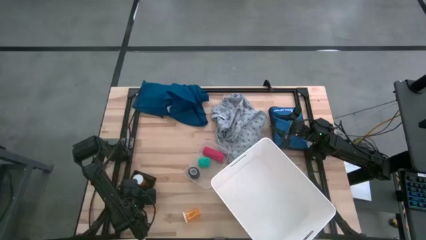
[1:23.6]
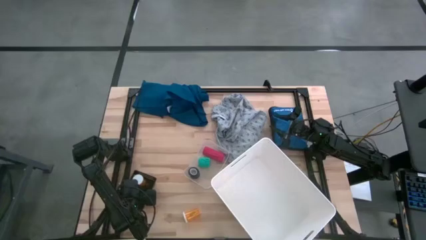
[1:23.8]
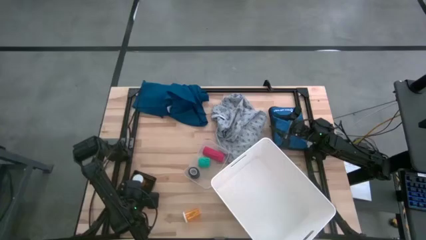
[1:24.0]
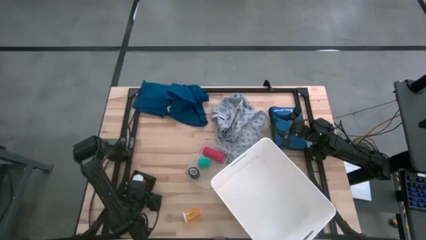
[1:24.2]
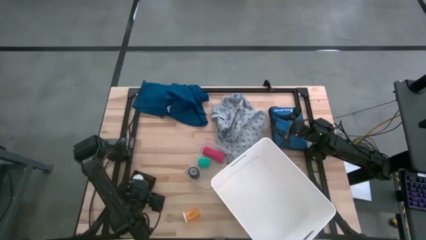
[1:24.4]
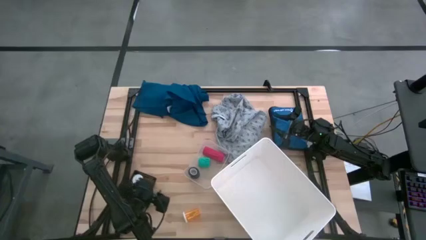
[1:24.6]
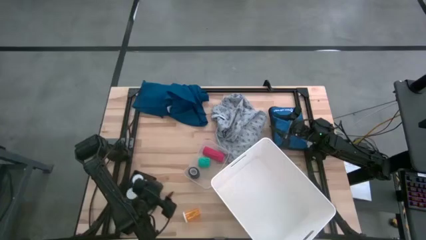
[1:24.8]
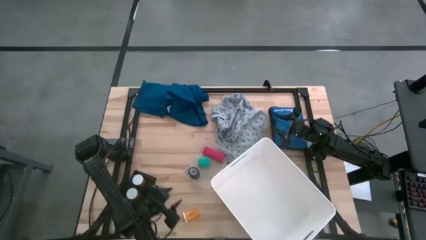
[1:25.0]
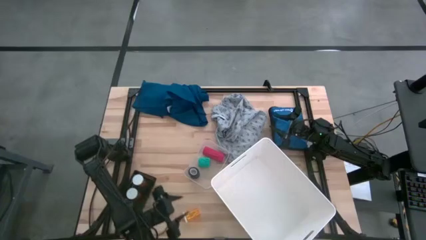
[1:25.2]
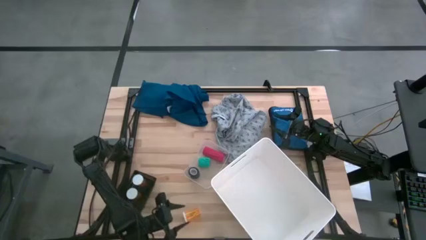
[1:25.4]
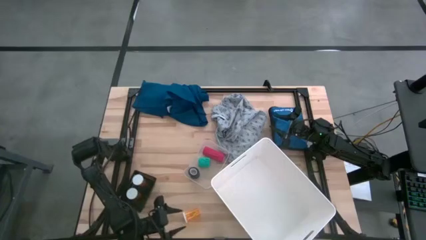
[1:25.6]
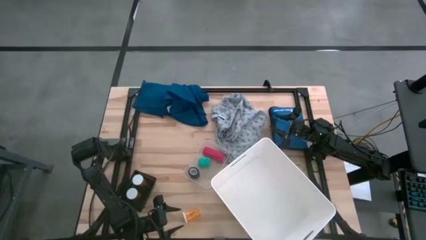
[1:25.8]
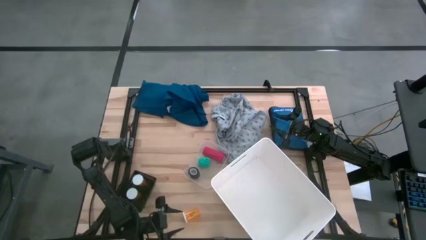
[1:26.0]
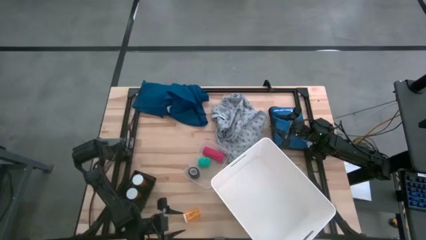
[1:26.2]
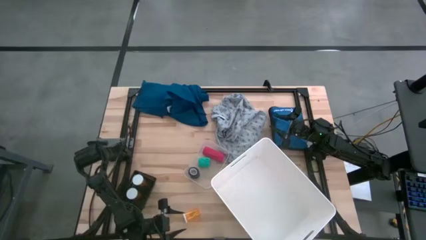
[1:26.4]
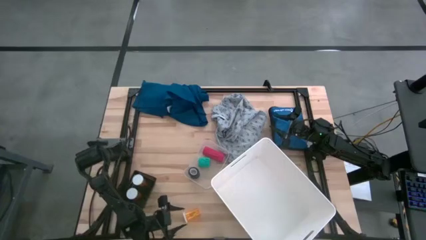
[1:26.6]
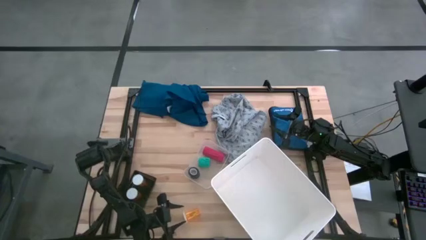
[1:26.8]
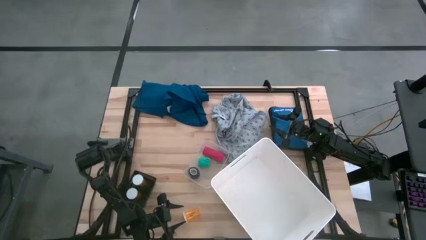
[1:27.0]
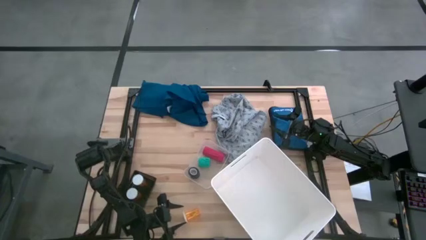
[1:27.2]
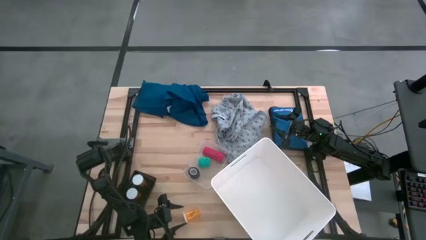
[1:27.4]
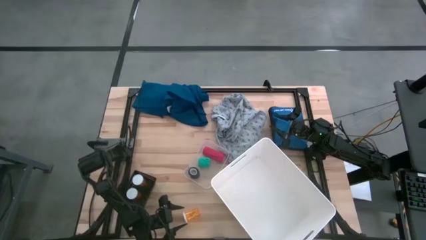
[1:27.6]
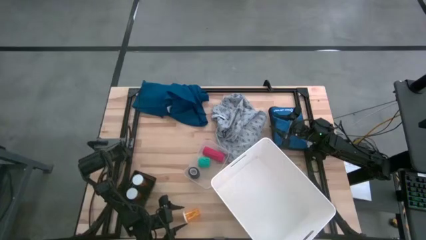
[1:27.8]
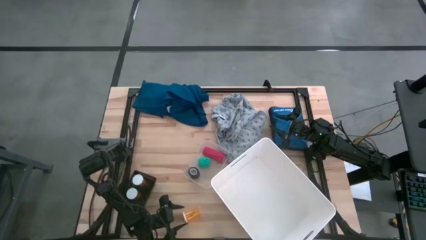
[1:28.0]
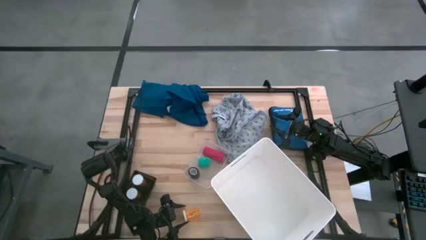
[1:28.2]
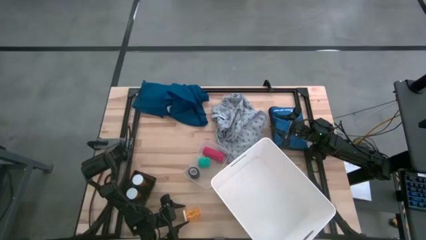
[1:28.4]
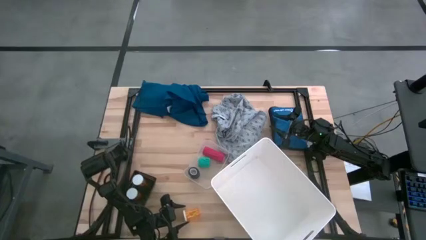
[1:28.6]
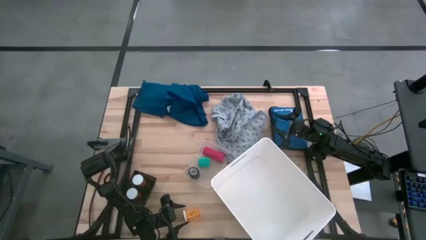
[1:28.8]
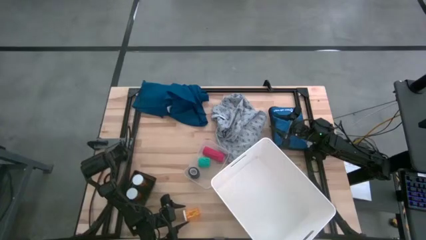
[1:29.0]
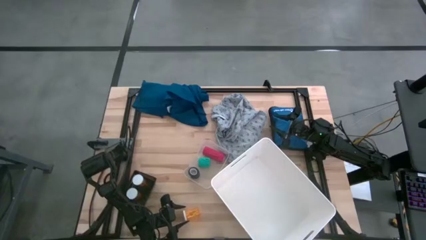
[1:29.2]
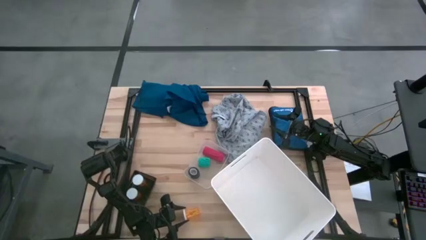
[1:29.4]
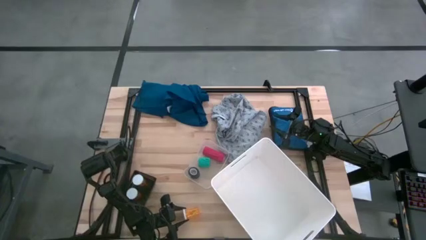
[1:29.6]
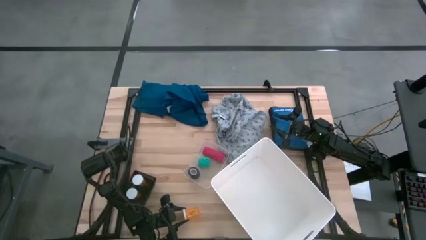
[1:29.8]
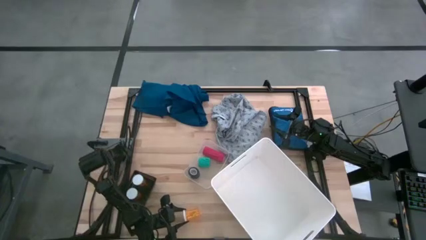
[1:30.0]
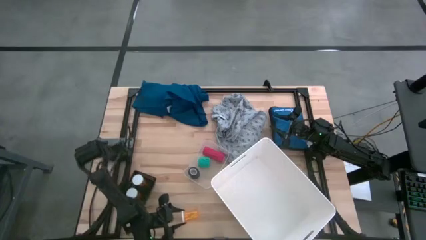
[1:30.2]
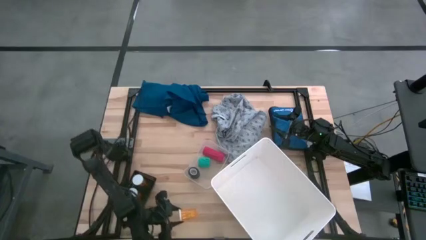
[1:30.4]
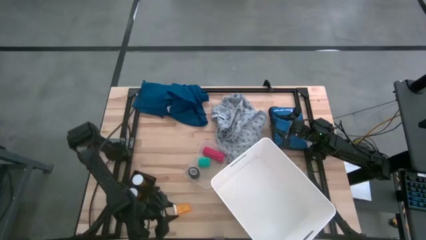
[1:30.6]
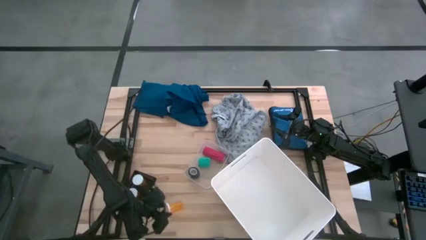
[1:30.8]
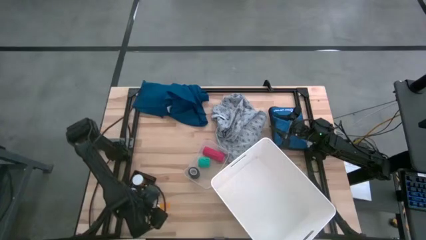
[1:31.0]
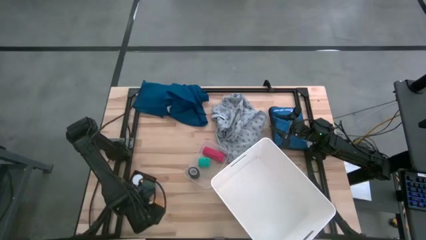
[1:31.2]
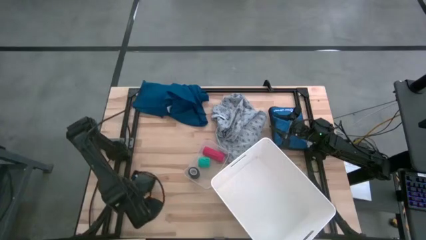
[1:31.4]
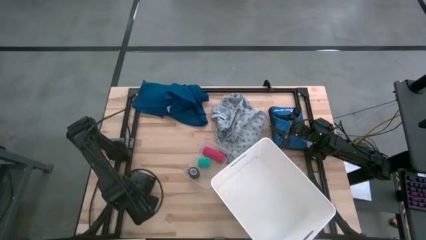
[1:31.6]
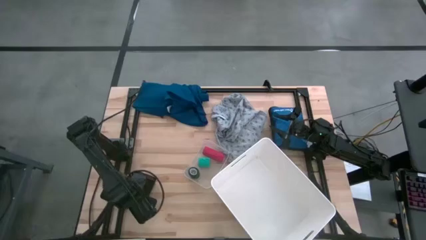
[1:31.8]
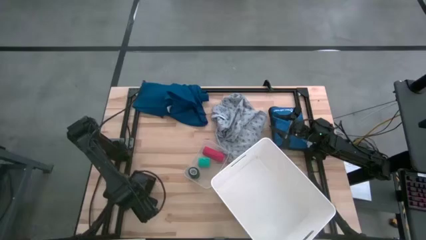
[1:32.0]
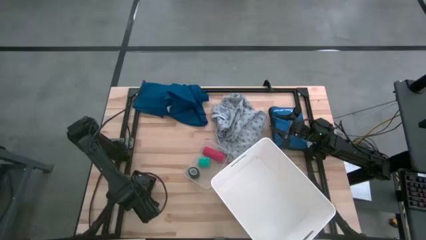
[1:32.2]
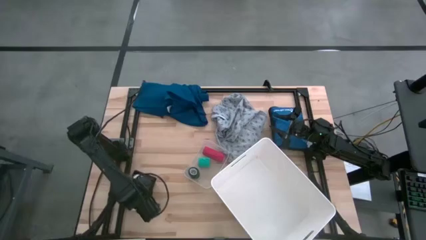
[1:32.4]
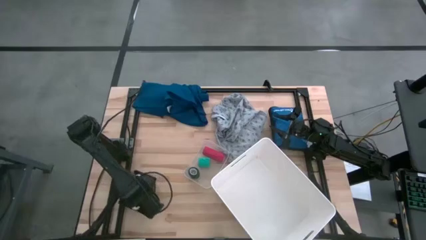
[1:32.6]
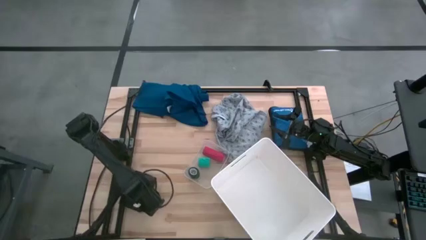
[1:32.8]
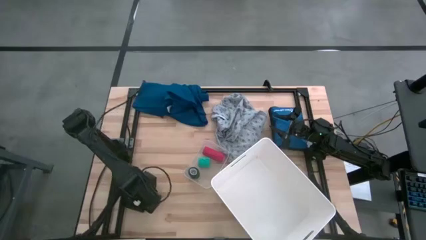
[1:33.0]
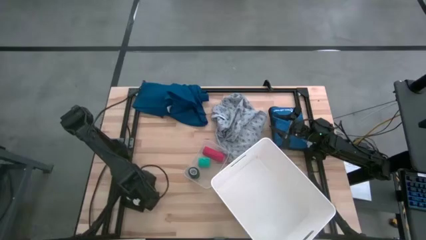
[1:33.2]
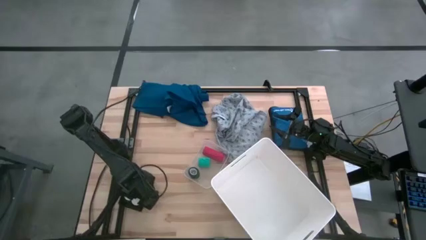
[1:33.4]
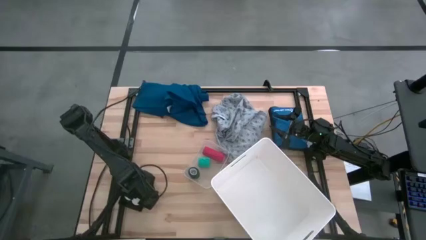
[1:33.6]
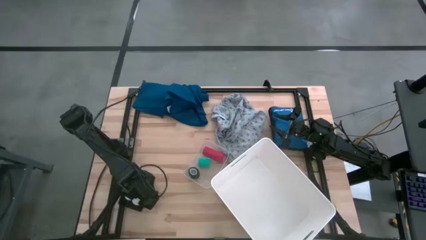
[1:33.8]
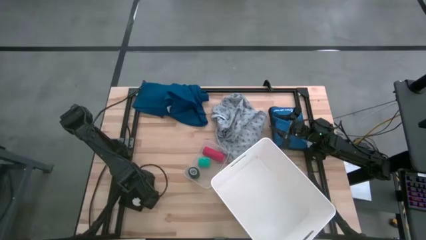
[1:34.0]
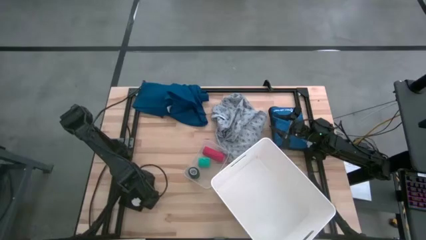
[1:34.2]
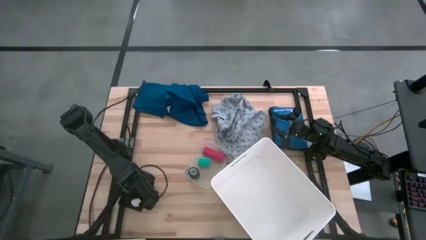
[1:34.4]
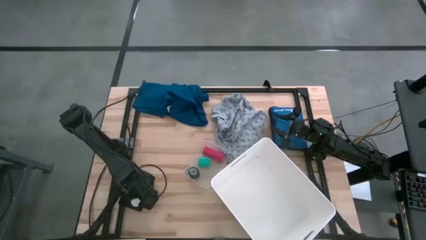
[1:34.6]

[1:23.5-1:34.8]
Task: Pick & Place Medicine items
Put the orange medicine bottle into the black bin

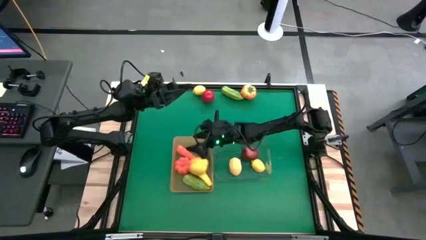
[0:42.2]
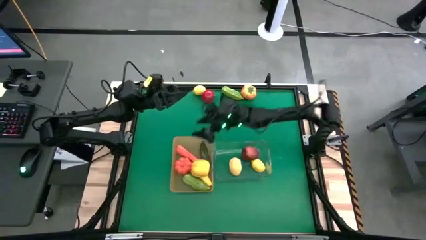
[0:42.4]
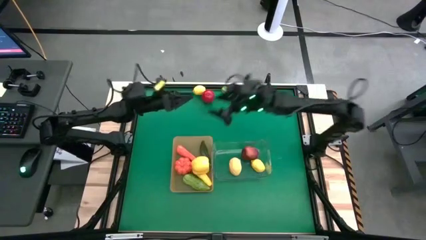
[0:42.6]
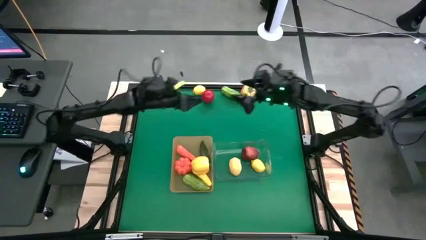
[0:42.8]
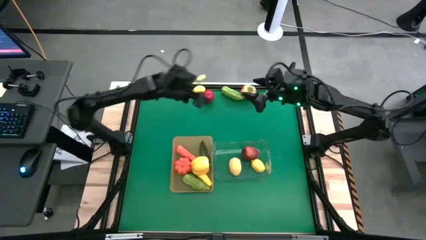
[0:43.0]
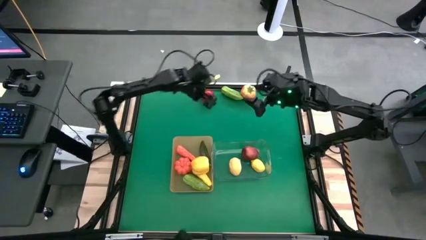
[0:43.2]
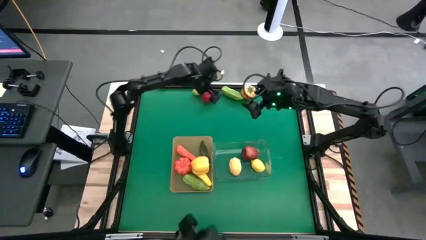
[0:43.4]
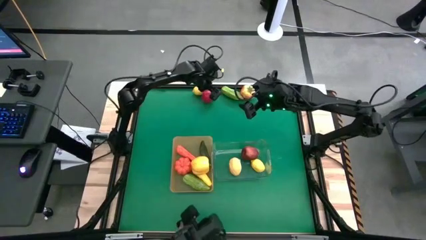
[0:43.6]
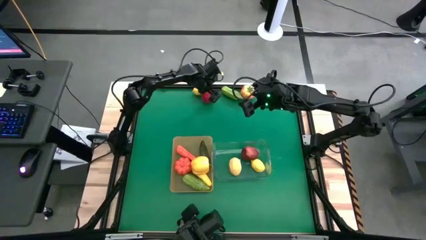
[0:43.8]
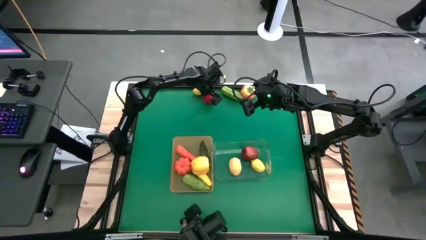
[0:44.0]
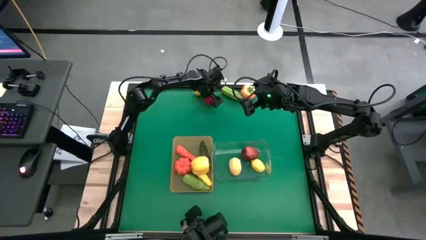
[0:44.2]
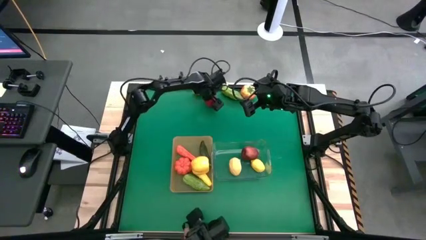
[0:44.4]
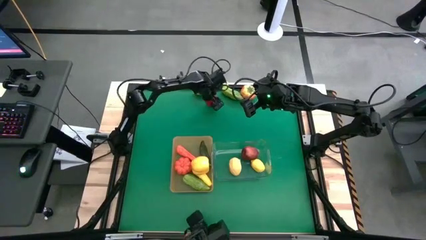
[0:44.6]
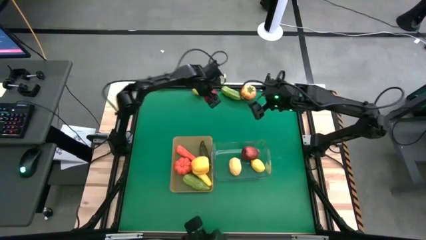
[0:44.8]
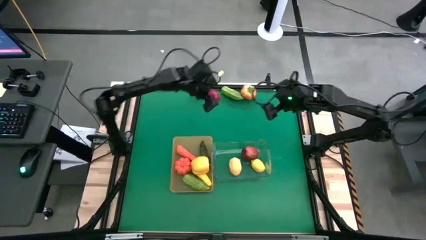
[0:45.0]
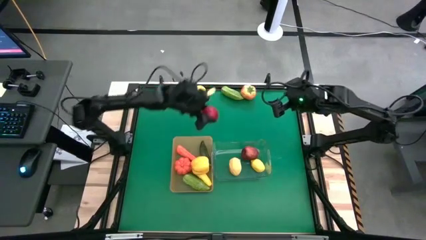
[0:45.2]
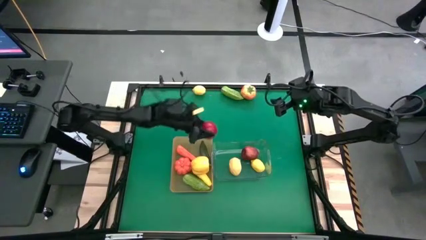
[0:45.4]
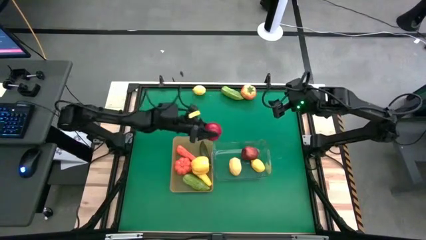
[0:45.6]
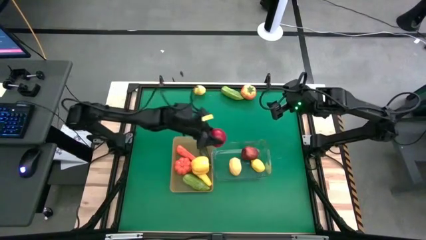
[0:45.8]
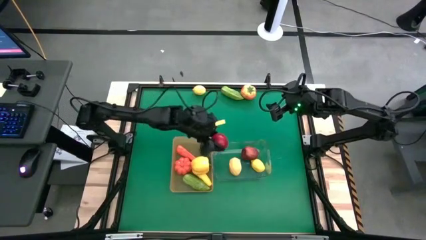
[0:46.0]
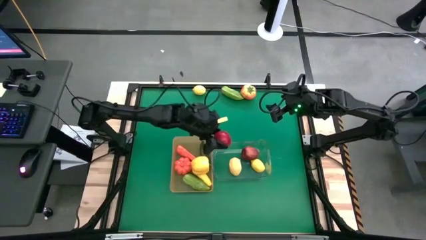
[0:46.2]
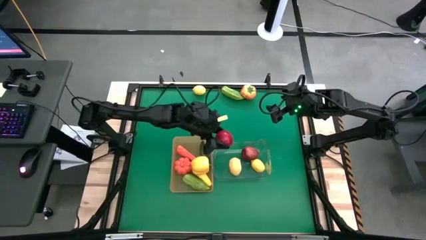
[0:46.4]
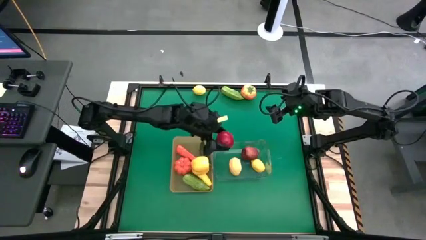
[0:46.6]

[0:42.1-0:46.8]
Task: Sort produce into baskets
Put the left tomato into the transparent bin

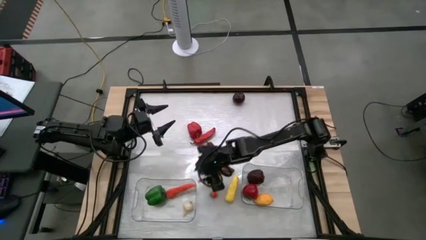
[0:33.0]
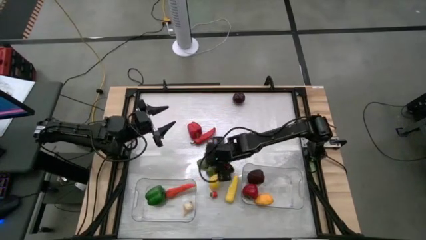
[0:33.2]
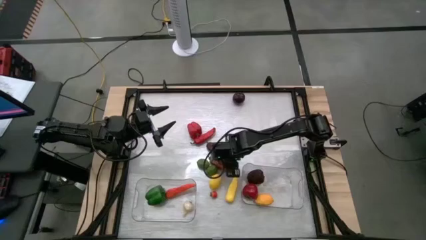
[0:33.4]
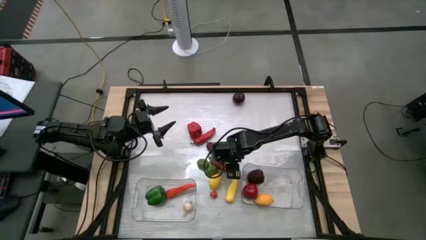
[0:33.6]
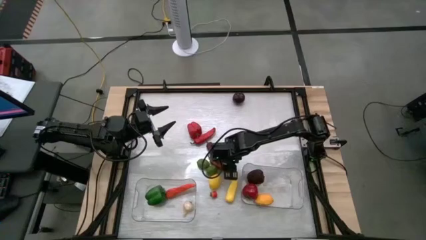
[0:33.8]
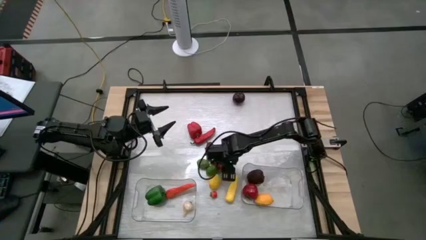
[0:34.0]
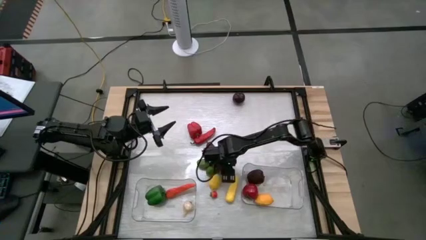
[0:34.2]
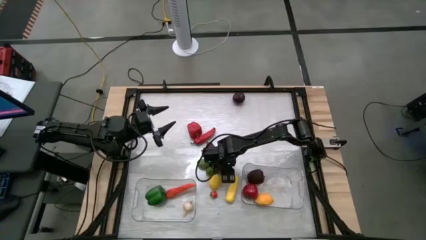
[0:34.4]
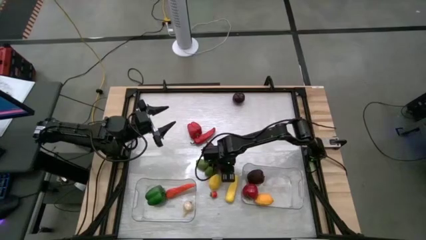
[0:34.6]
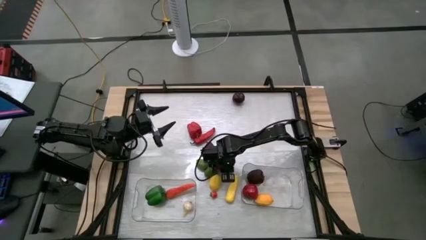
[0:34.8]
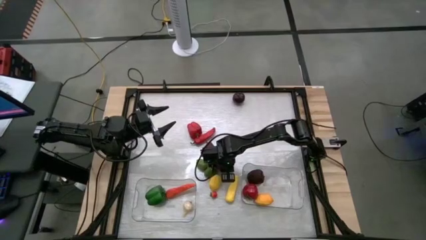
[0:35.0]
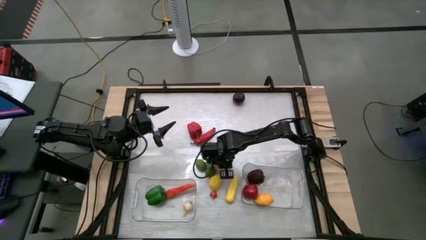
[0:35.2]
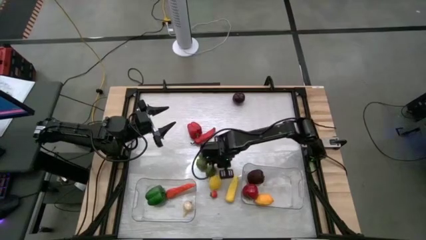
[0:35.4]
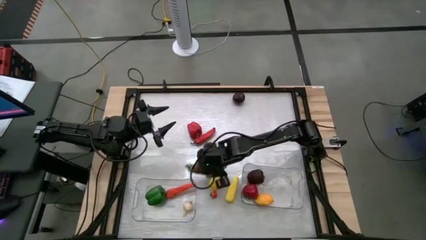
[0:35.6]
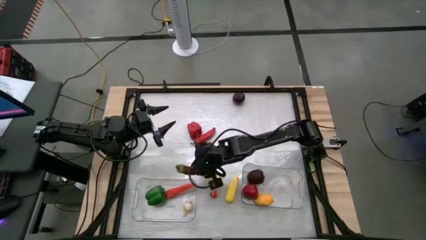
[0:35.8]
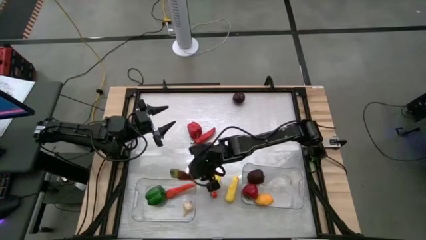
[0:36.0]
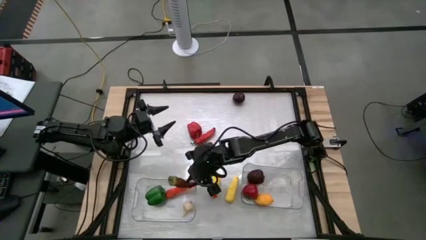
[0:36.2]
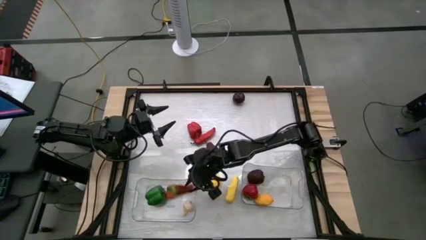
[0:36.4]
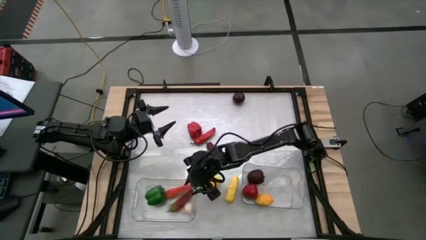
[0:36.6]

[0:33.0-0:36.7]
Task: Sort produce into baskets
Put the bottom dark red bell pepper into the left transparent bin
